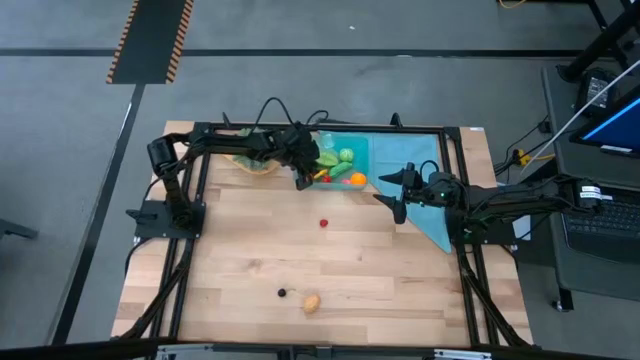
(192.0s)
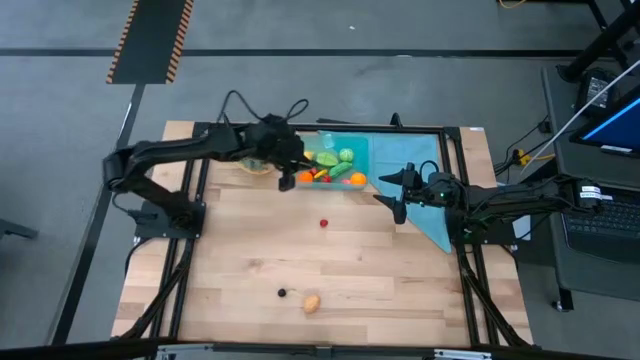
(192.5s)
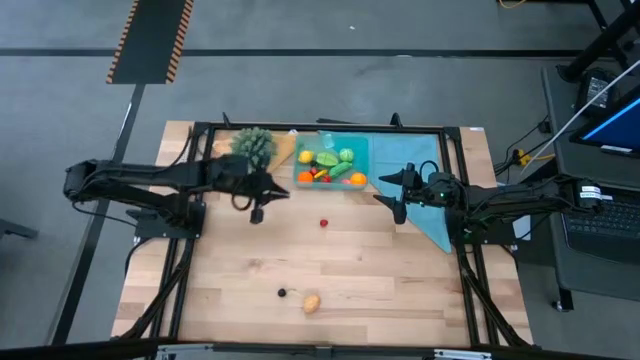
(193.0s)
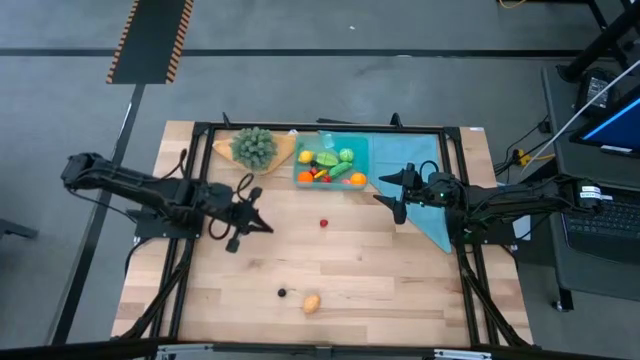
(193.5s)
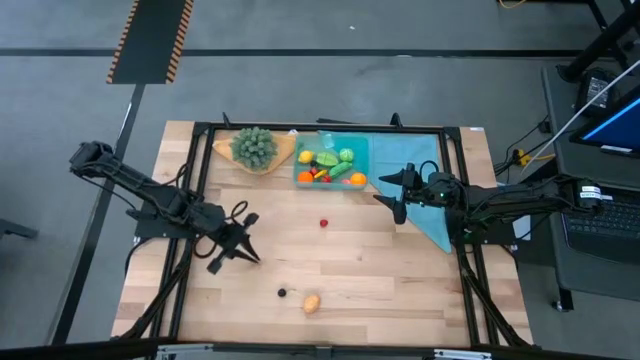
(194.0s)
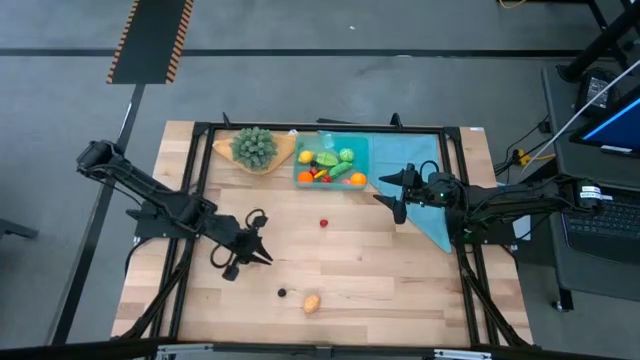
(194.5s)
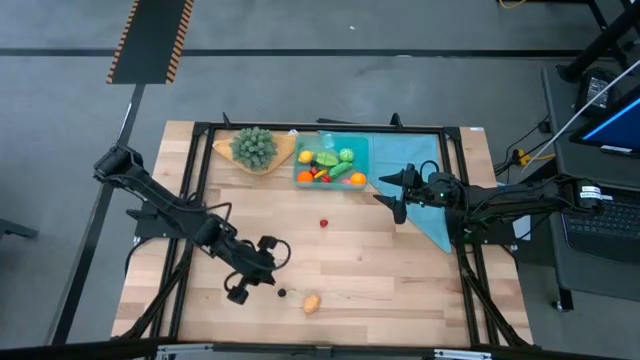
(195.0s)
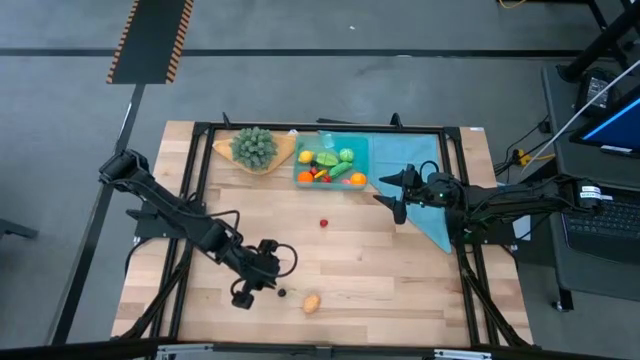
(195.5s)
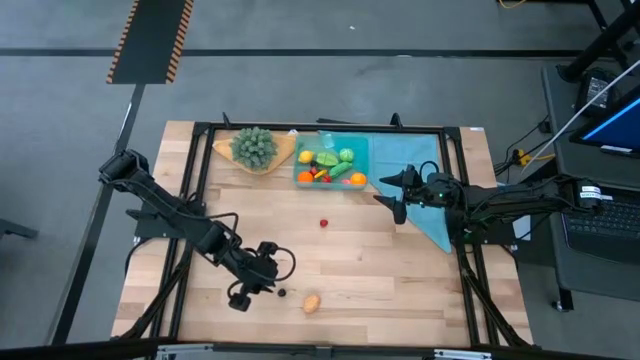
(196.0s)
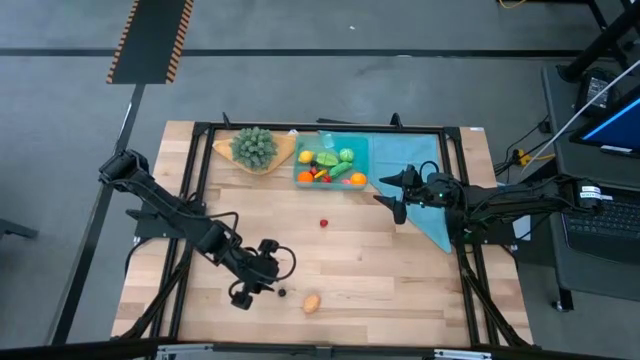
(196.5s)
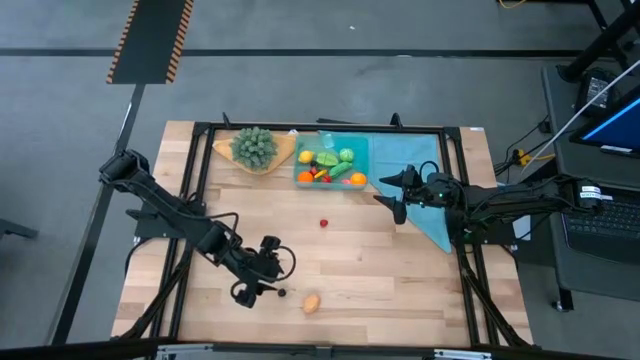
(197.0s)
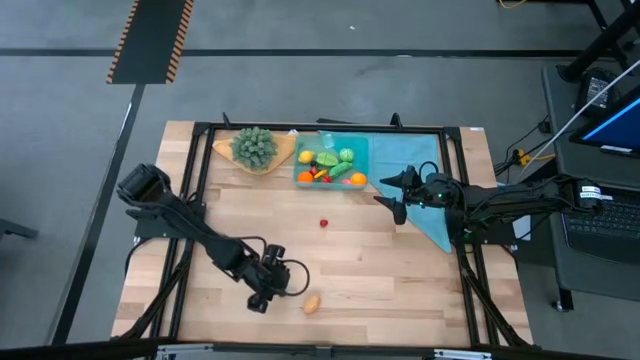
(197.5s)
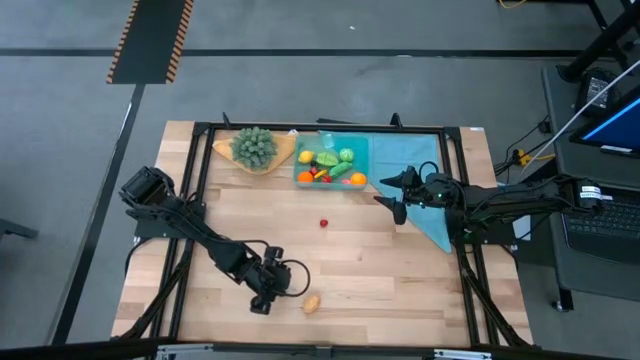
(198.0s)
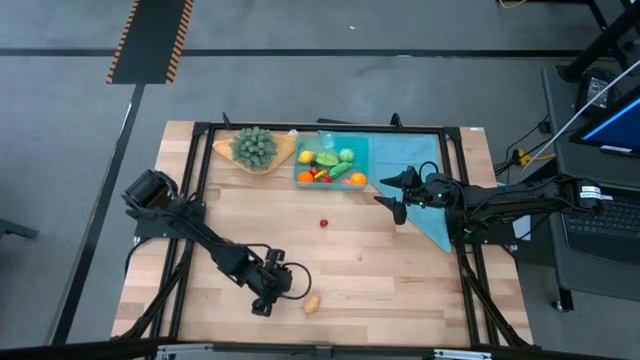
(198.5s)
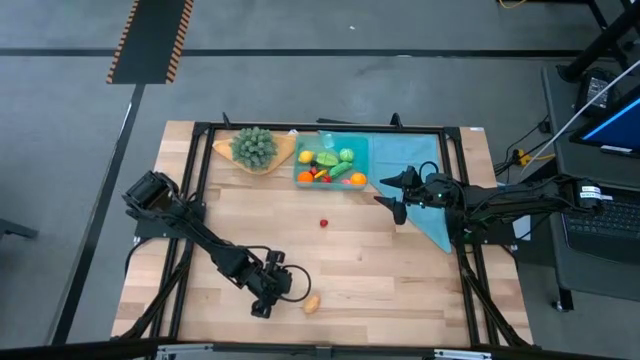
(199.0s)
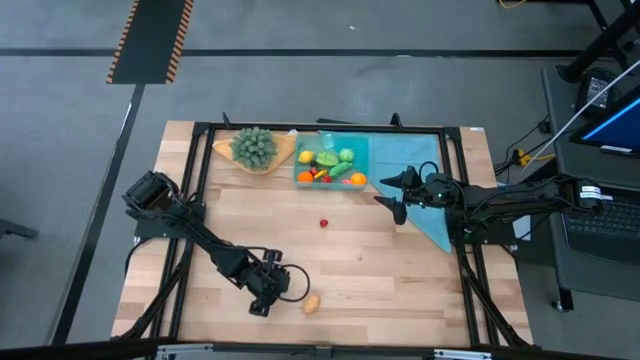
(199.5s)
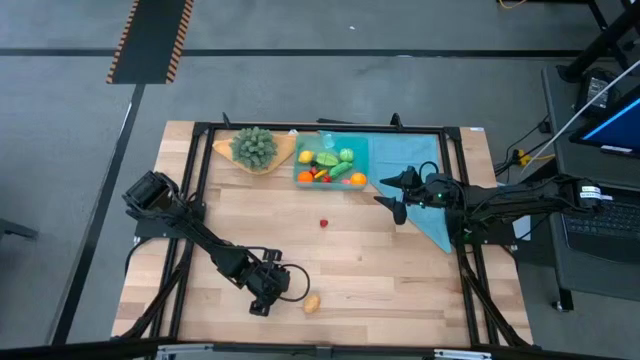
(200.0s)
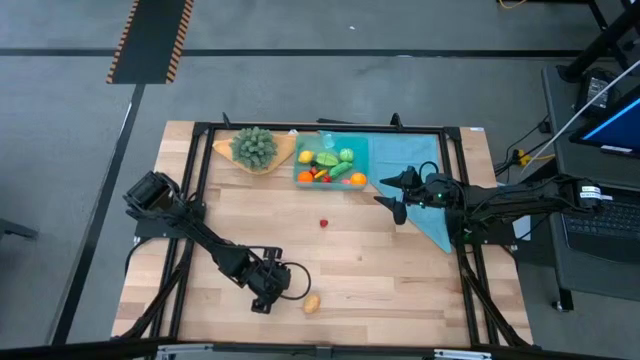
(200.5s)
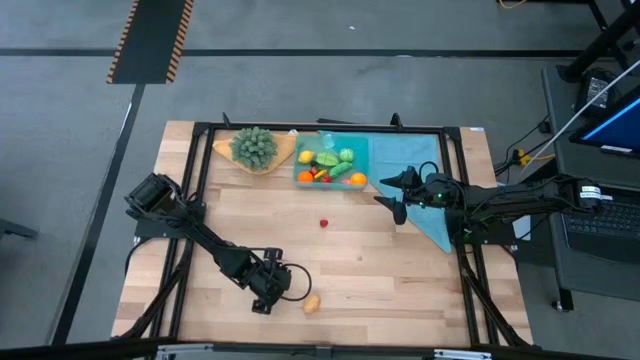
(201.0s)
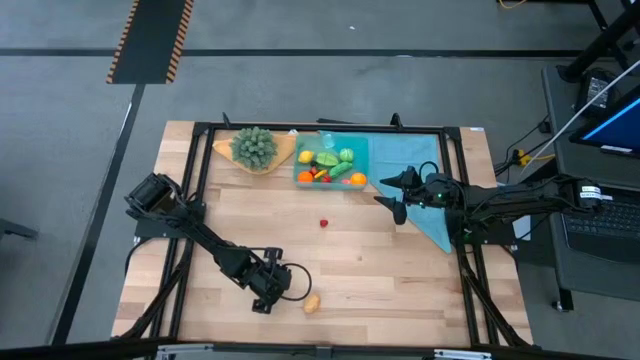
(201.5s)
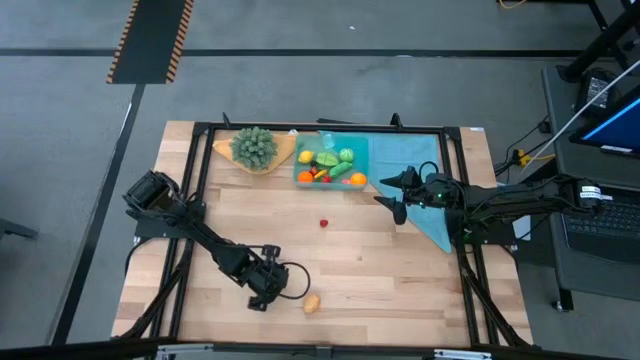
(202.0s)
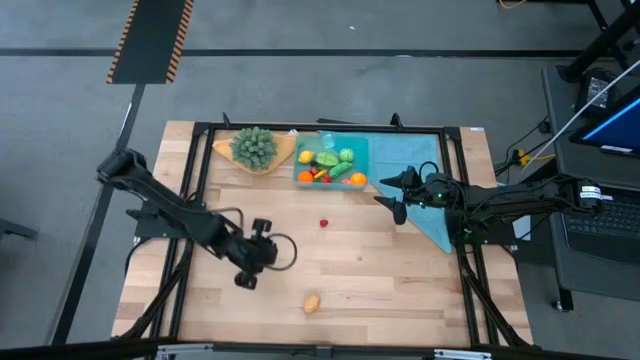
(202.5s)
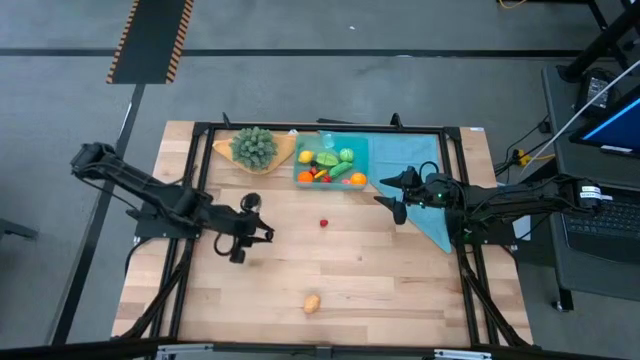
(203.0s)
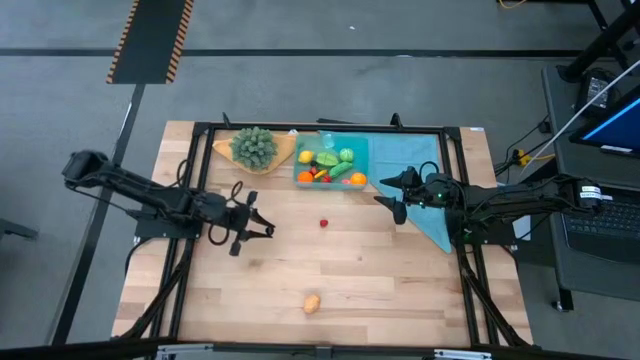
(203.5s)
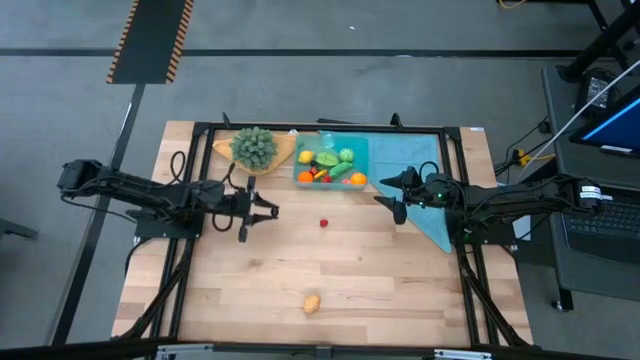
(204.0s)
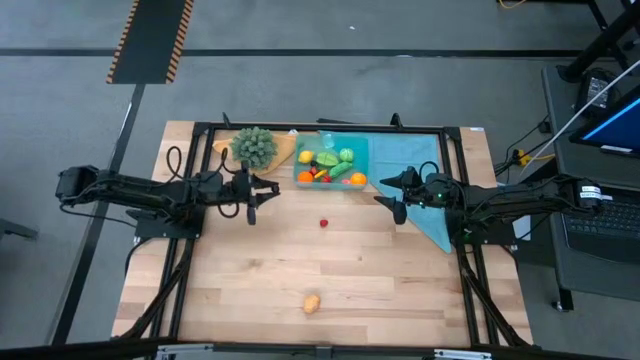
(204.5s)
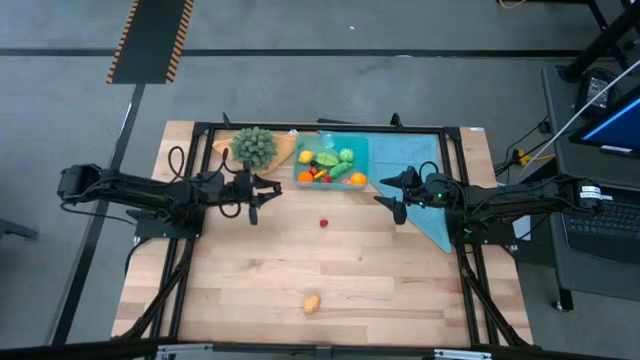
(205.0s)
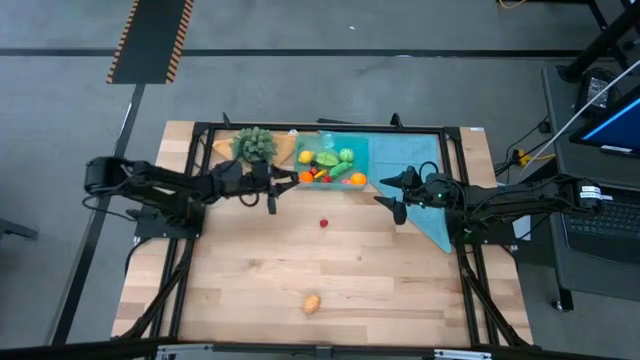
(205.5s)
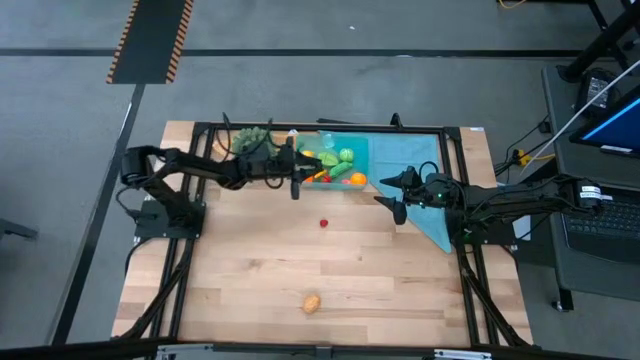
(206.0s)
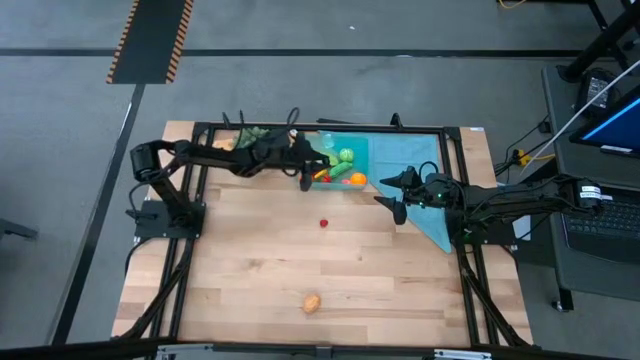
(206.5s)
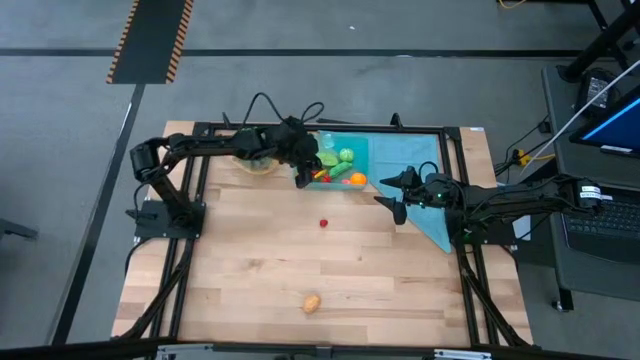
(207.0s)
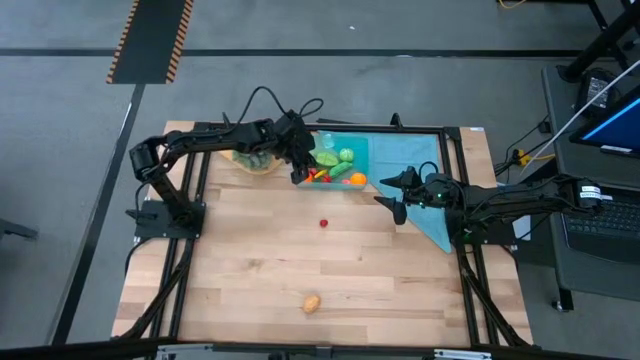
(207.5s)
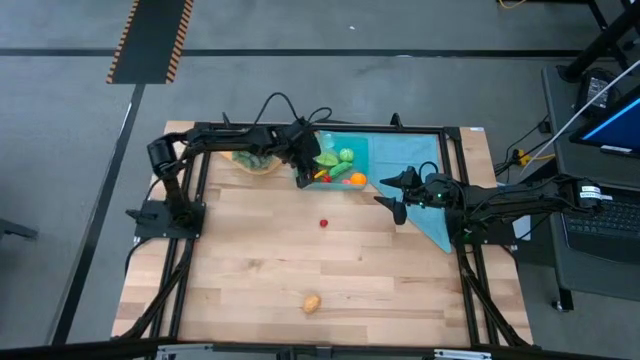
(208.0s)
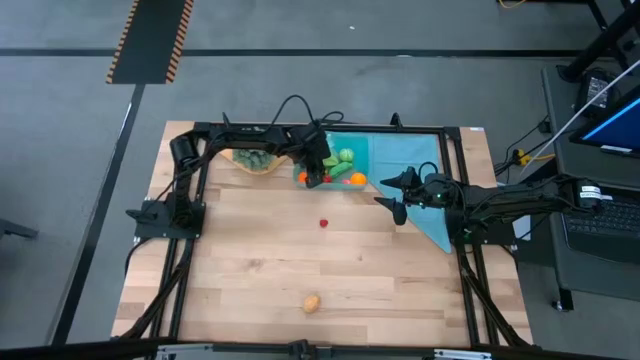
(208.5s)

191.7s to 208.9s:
Task: Pick and placing Produce into tupperware
Put the bing cherry into the blue bin
